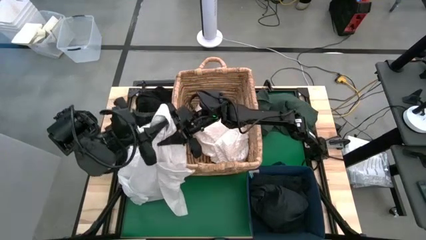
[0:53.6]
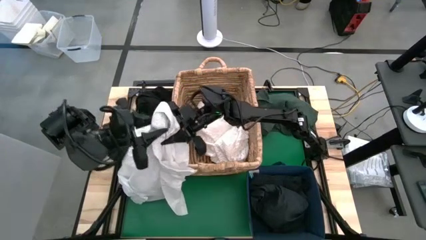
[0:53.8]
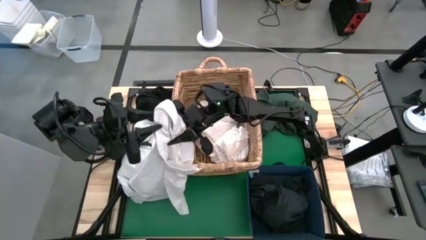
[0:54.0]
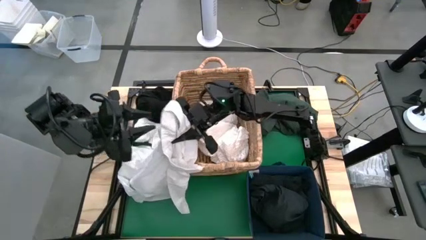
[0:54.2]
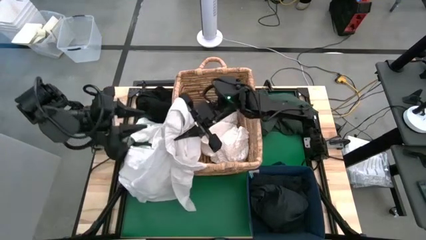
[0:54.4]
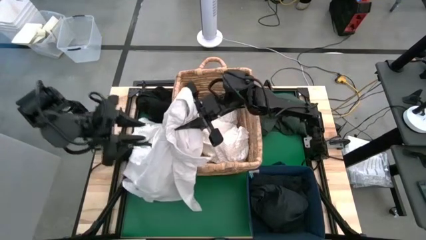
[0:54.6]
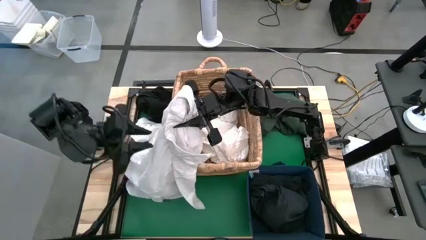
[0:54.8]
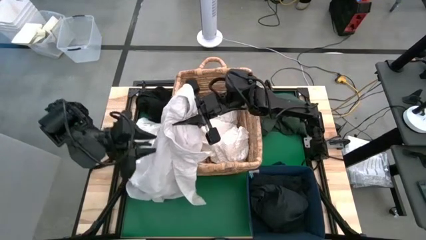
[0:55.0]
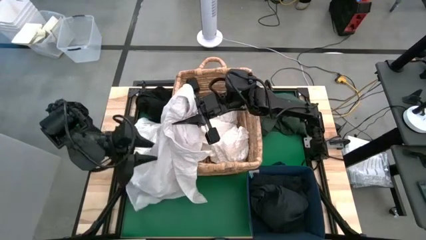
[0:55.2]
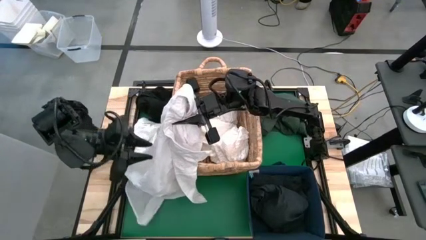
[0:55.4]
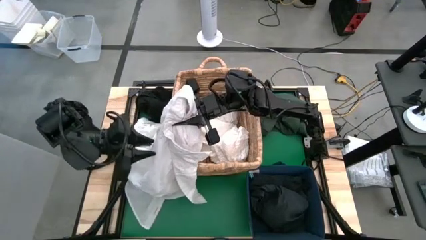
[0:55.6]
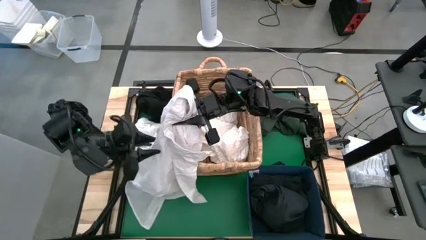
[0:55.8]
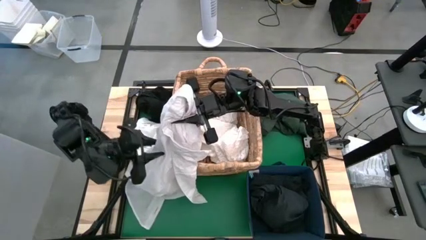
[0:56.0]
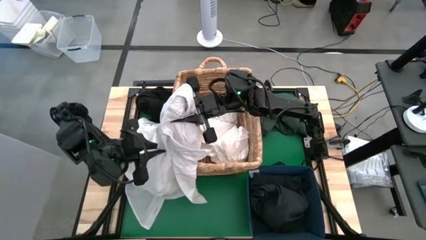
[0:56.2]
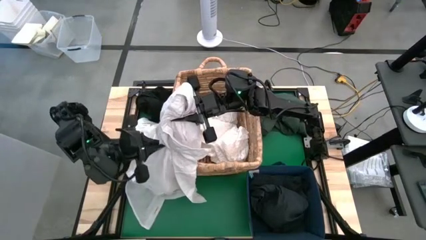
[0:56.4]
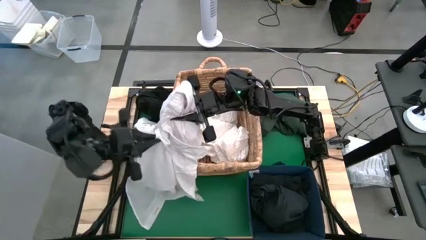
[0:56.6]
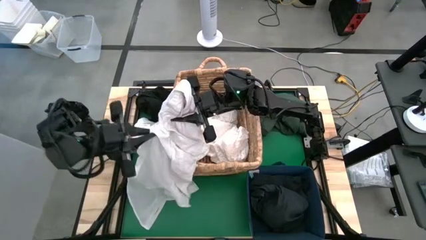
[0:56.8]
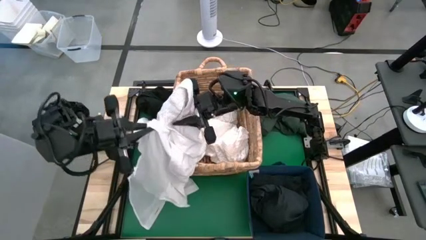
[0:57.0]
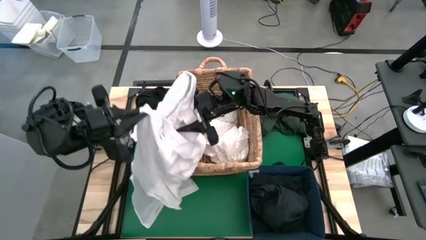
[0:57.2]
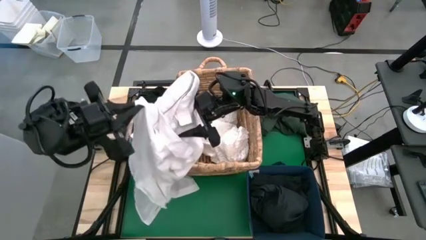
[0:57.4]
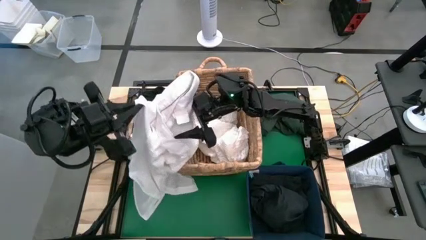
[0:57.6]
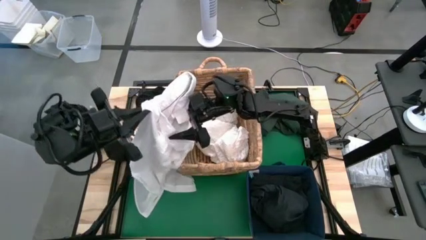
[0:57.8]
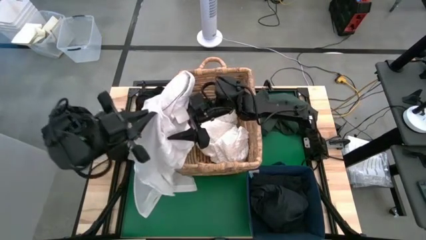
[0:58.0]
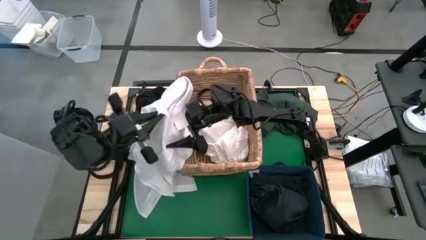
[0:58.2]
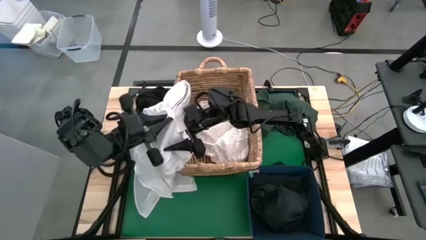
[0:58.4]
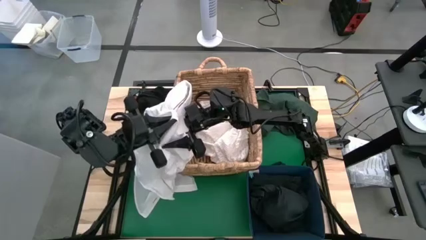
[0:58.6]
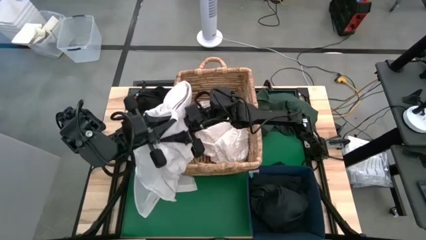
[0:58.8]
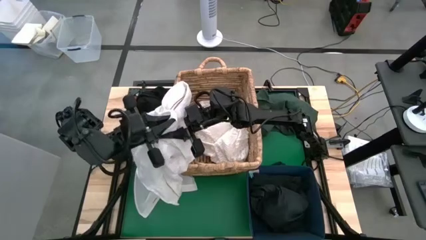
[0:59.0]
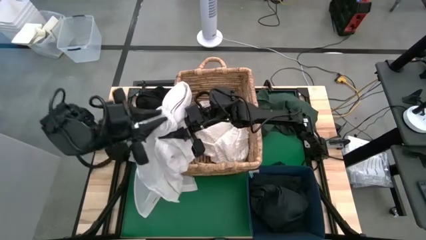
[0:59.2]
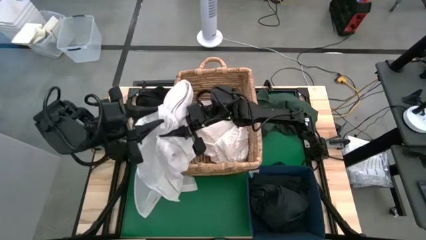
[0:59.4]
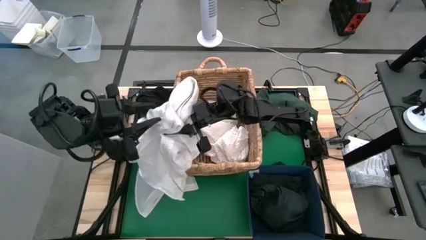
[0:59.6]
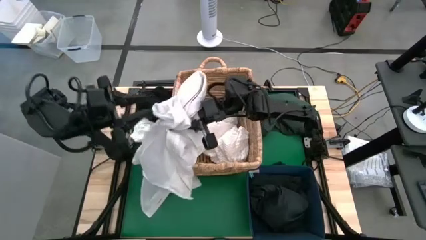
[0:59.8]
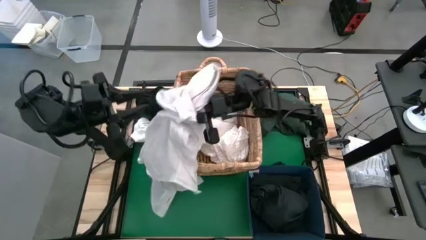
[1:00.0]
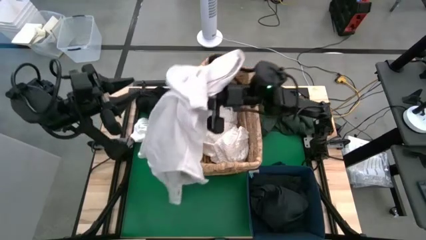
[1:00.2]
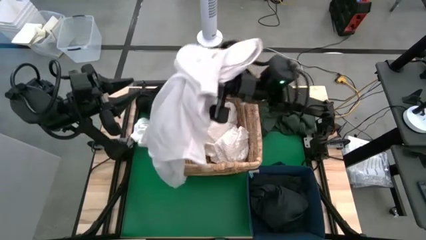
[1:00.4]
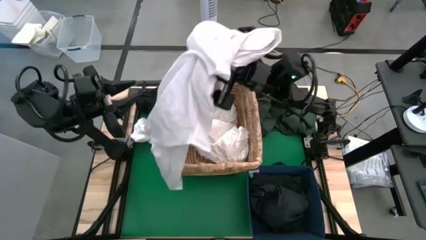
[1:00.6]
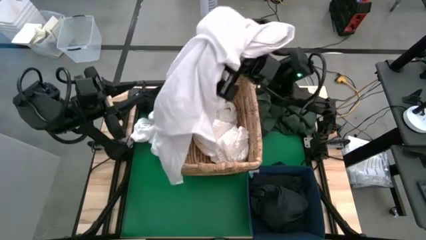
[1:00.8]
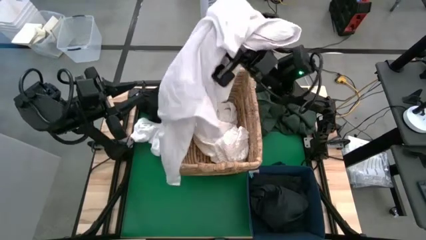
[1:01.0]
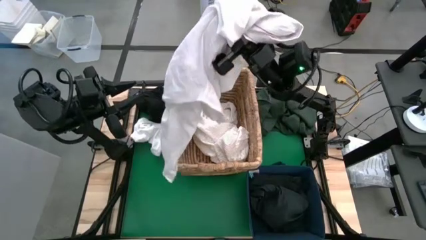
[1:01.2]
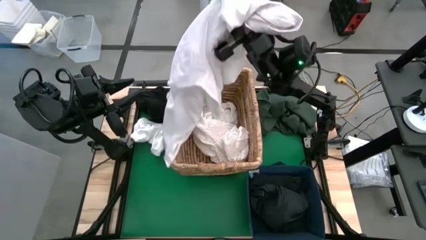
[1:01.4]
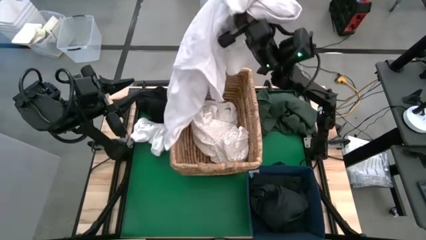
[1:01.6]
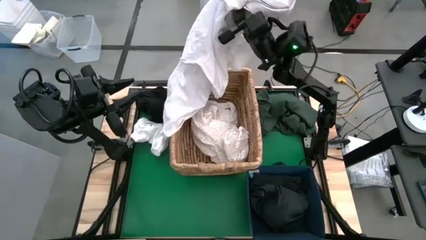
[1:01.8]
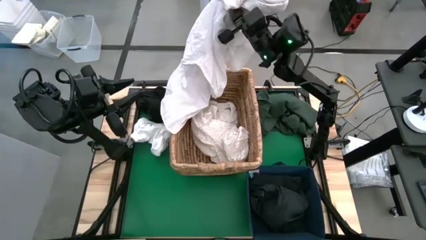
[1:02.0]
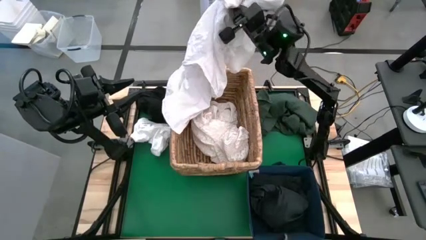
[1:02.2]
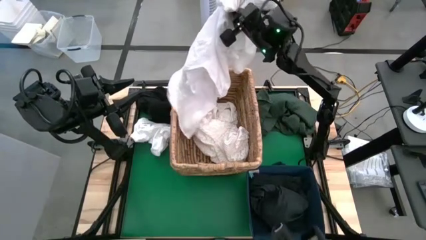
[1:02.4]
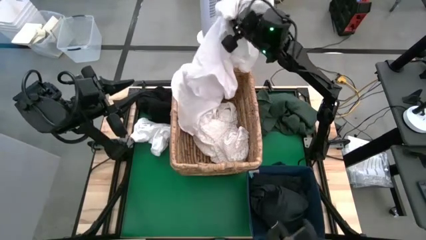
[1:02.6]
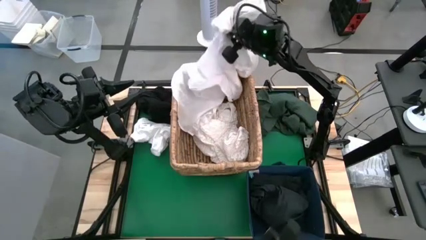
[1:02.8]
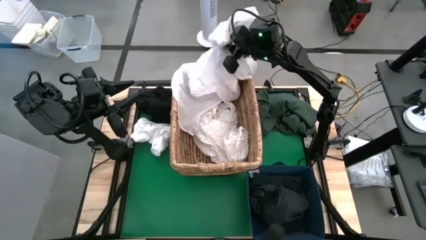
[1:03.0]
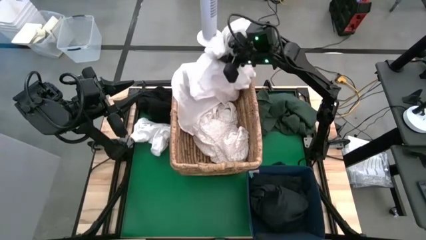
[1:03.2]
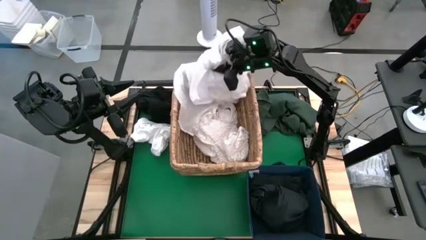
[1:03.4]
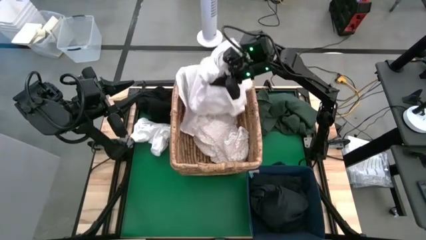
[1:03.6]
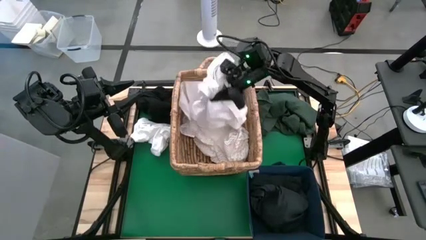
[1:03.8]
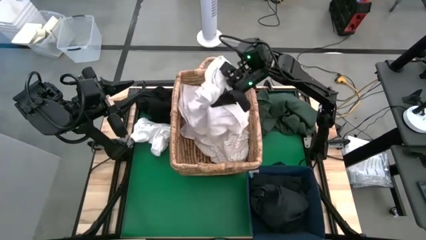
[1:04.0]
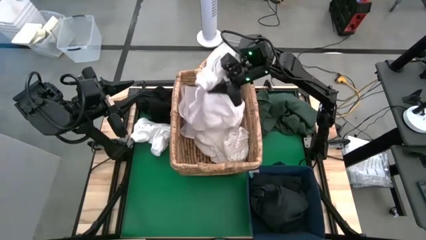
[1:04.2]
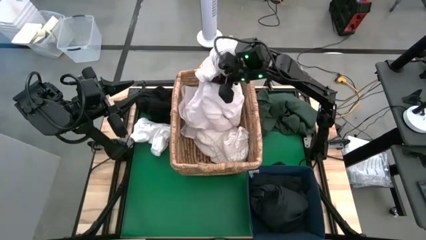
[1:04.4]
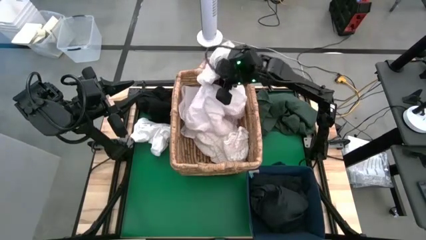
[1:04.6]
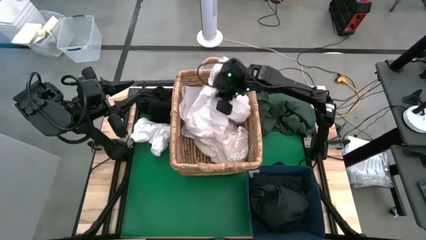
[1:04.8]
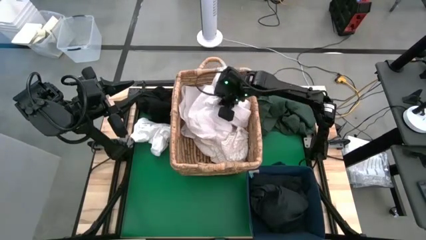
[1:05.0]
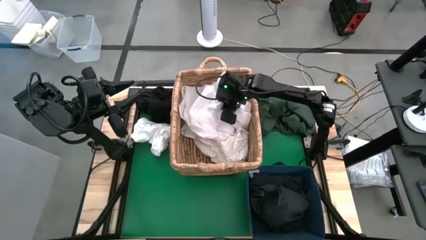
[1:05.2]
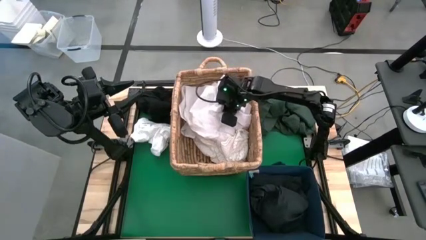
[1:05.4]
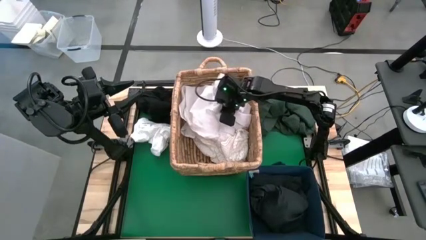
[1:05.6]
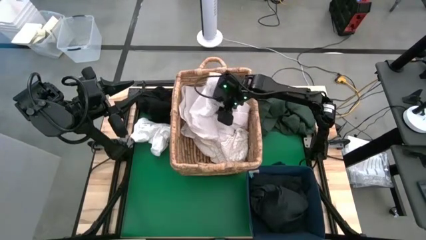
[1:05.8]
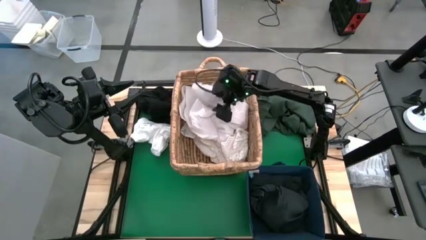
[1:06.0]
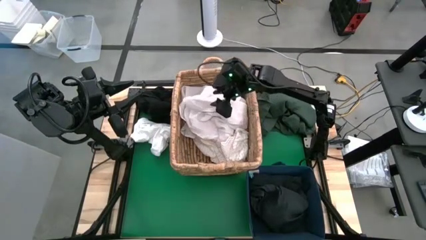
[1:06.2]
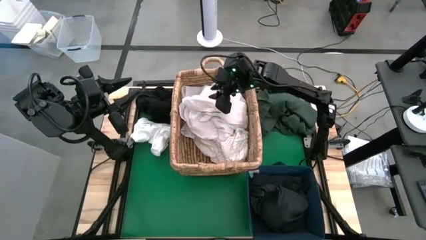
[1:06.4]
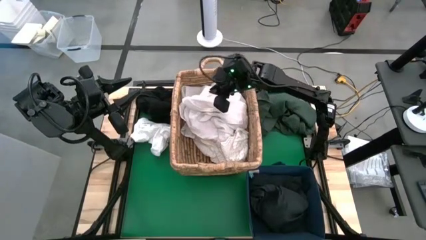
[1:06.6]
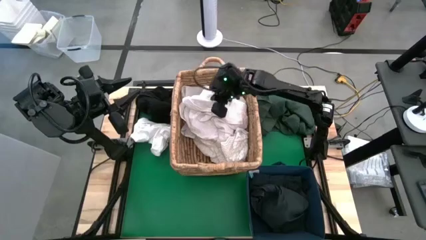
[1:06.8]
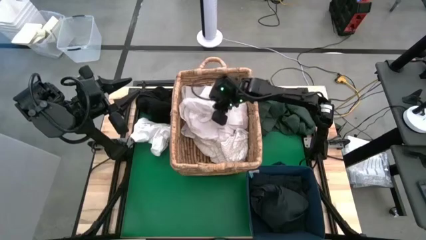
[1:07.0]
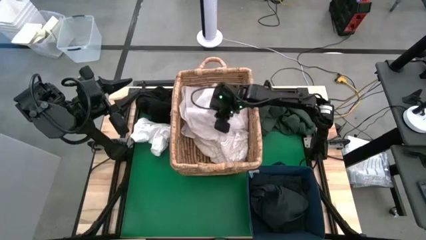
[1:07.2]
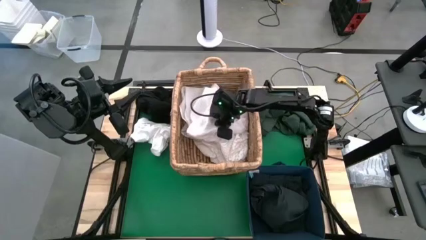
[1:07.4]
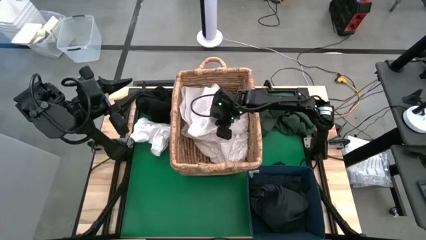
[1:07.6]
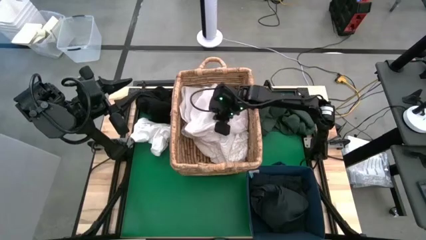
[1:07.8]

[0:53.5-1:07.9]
Put the white polo shirt into the basket

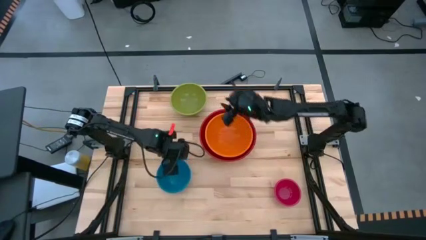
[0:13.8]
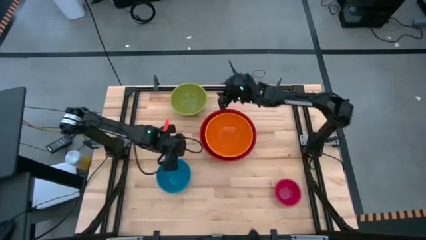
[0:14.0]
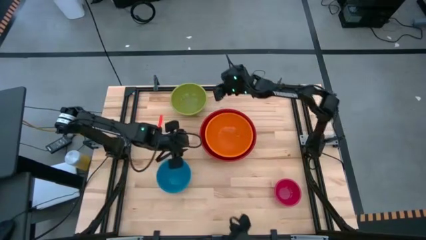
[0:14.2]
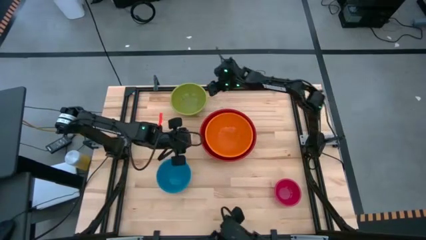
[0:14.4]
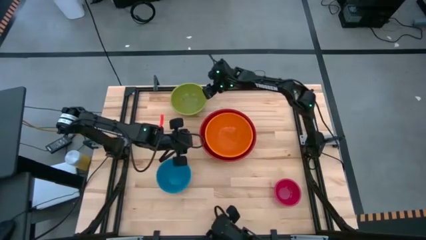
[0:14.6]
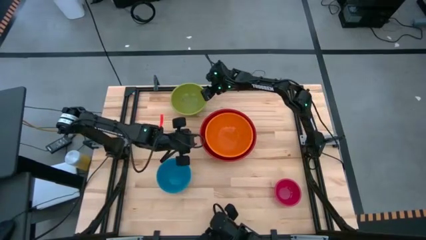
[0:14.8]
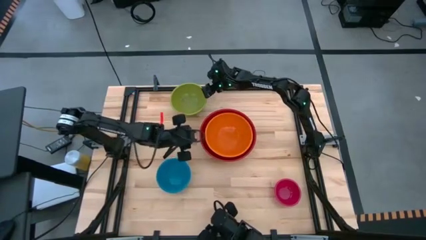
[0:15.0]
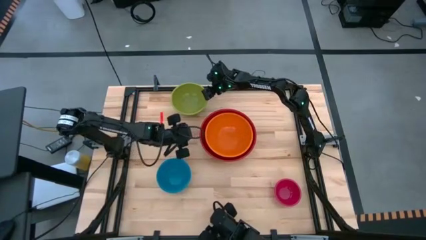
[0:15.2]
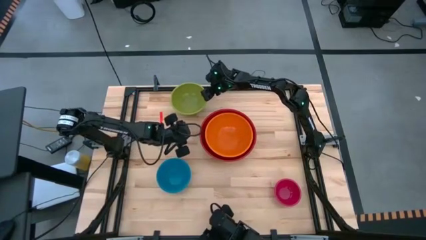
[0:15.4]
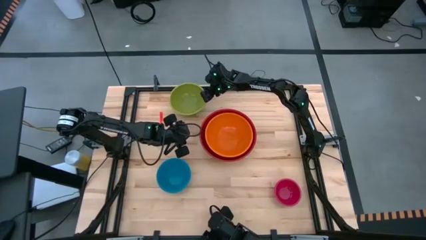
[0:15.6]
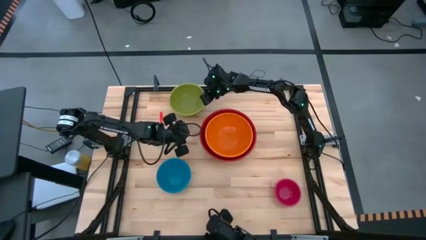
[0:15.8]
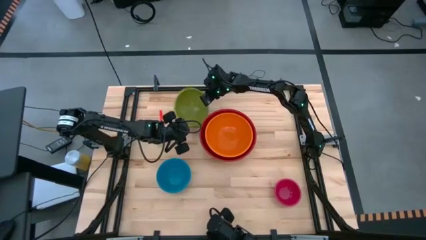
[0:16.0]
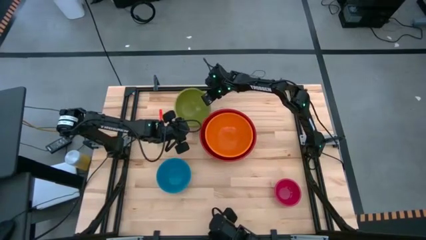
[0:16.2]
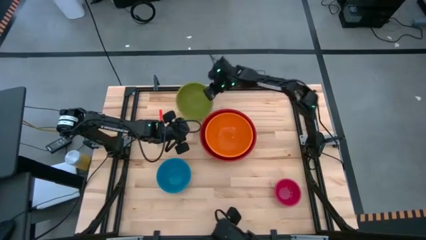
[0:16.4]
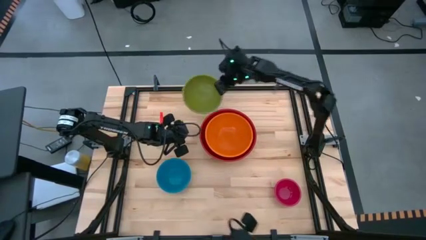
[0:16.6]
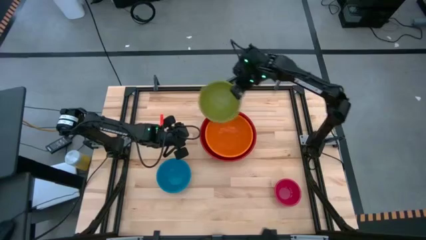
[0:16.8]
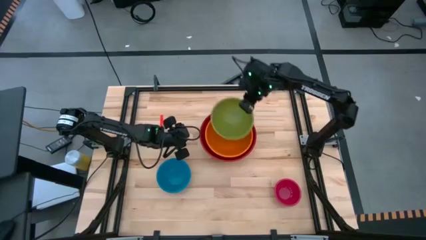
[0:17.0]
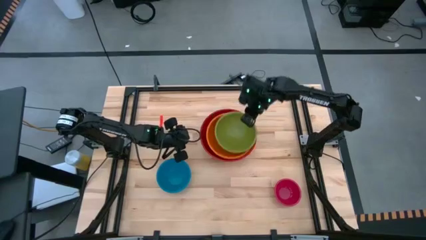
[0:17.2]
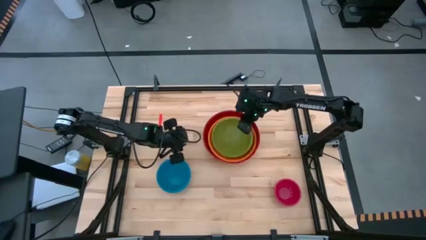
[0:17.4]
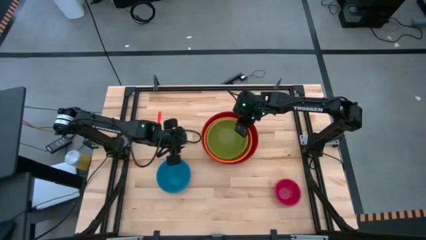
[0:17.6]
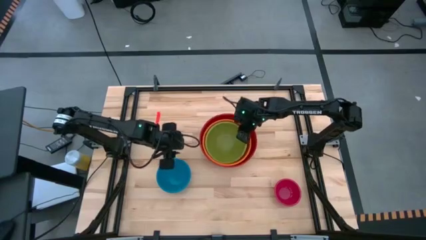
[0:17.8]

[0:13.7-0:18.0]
Stack the green bowl on top of the orange bowl
